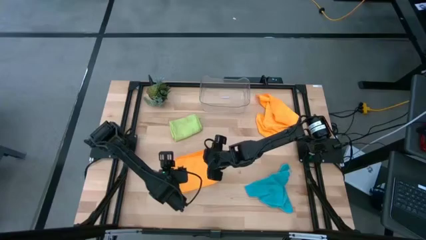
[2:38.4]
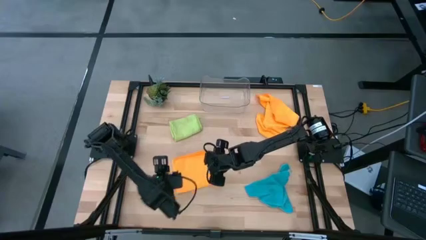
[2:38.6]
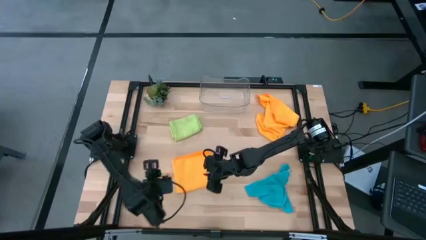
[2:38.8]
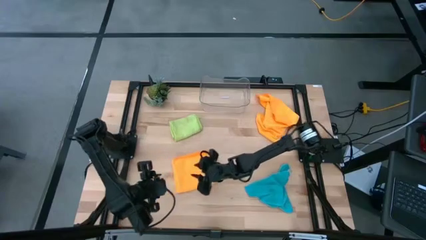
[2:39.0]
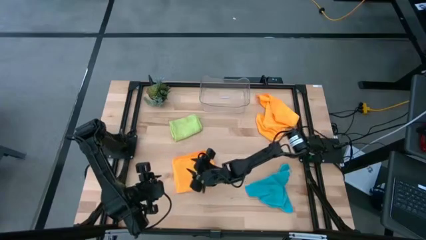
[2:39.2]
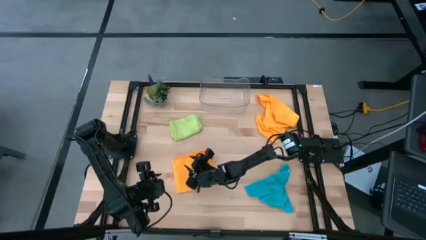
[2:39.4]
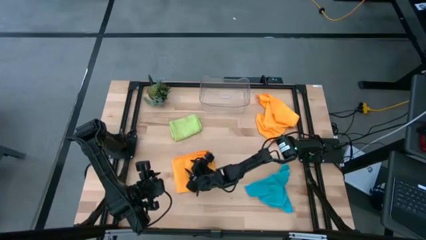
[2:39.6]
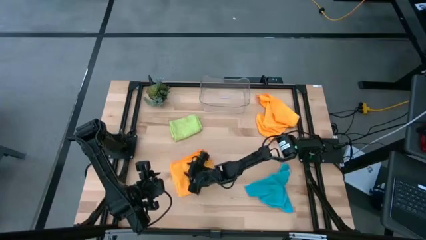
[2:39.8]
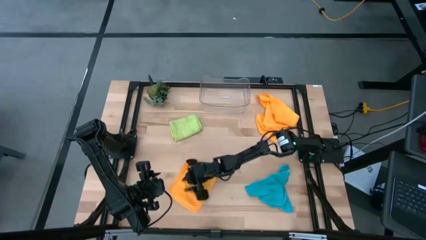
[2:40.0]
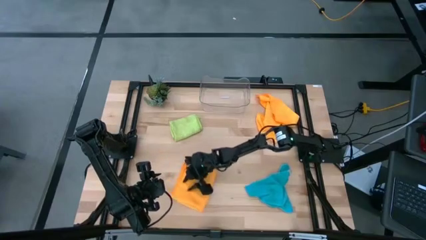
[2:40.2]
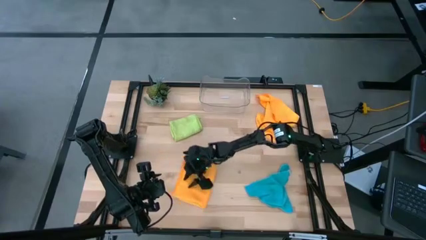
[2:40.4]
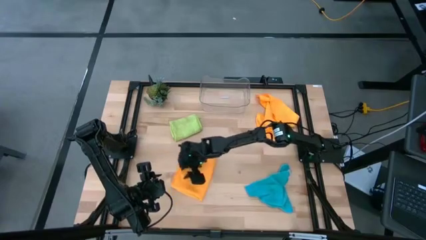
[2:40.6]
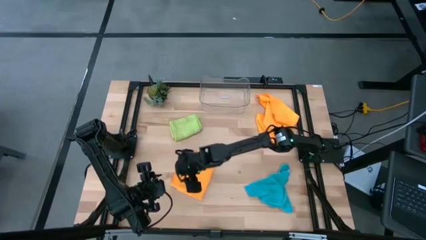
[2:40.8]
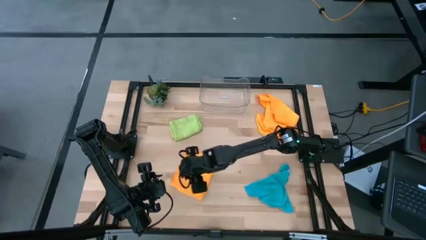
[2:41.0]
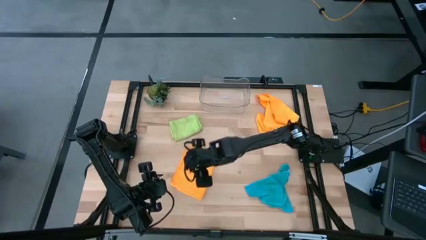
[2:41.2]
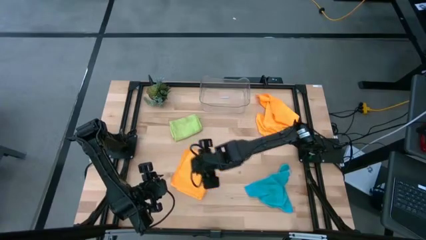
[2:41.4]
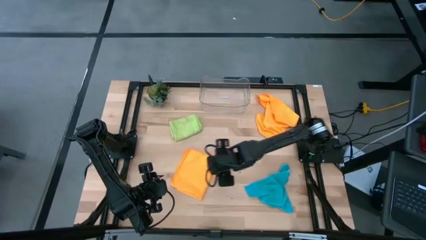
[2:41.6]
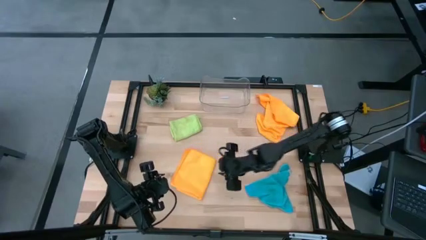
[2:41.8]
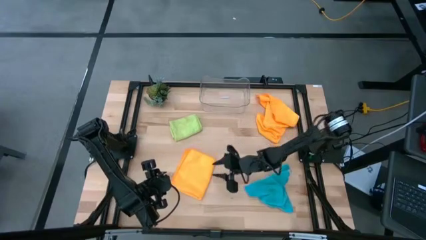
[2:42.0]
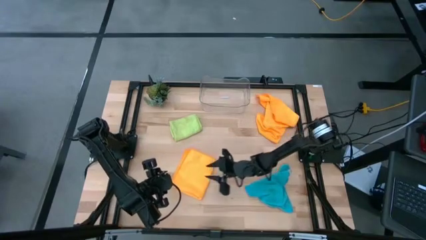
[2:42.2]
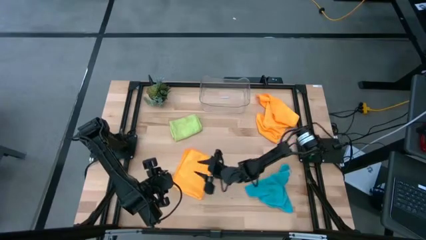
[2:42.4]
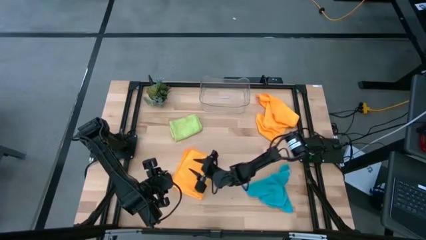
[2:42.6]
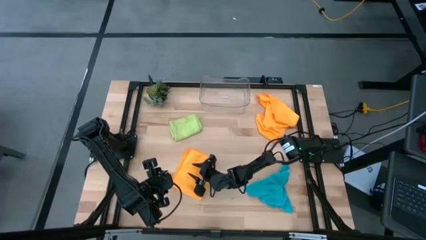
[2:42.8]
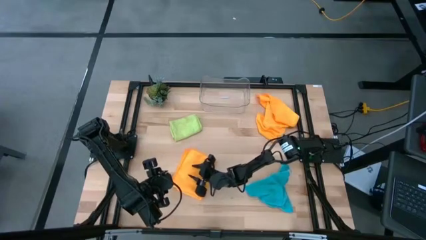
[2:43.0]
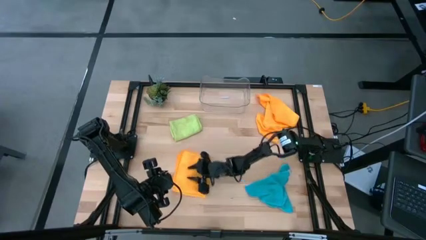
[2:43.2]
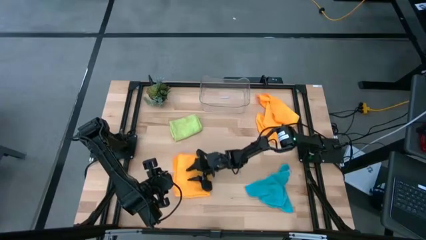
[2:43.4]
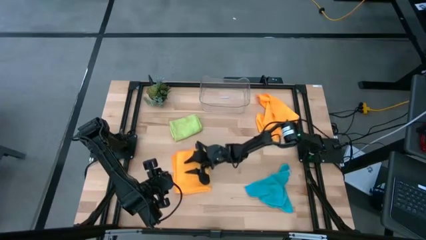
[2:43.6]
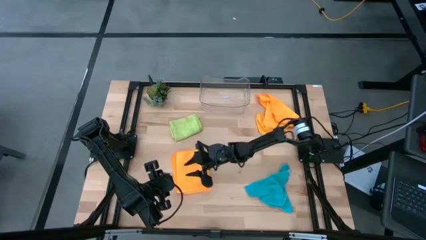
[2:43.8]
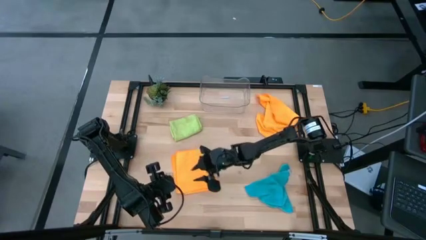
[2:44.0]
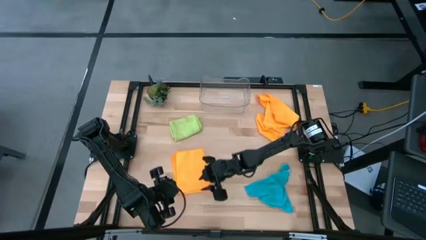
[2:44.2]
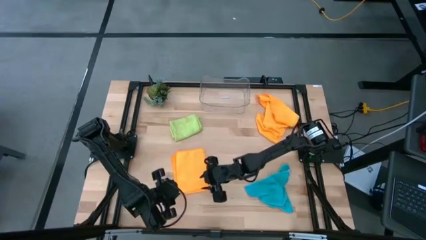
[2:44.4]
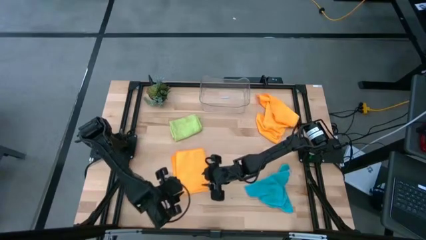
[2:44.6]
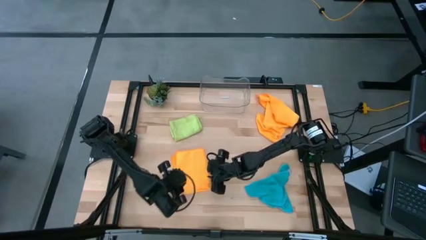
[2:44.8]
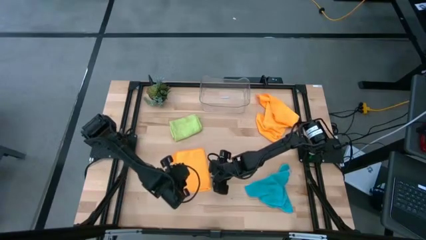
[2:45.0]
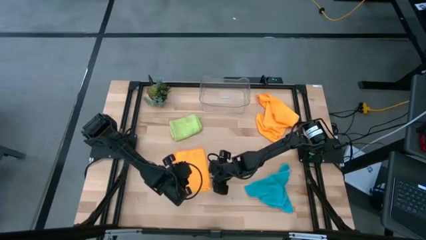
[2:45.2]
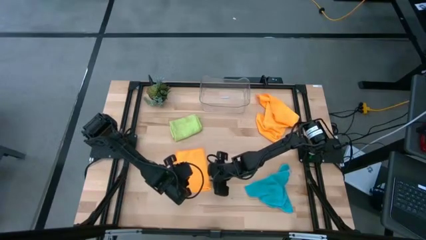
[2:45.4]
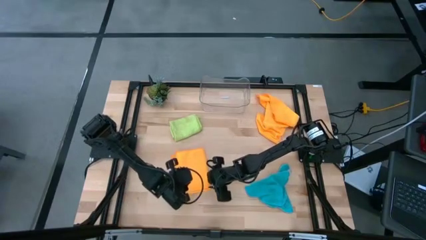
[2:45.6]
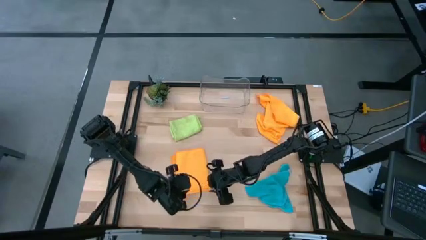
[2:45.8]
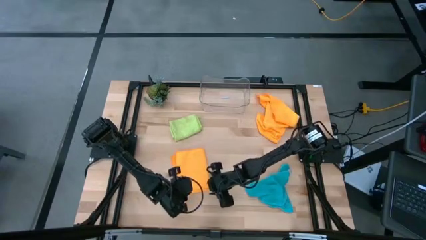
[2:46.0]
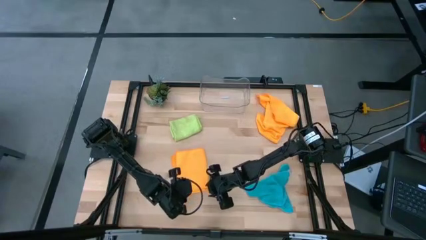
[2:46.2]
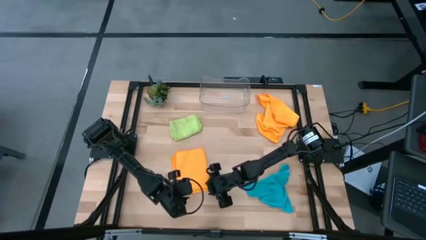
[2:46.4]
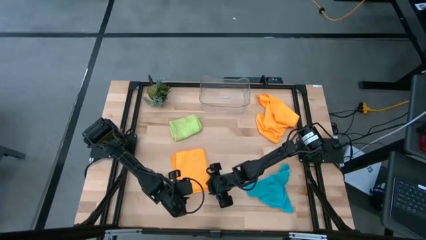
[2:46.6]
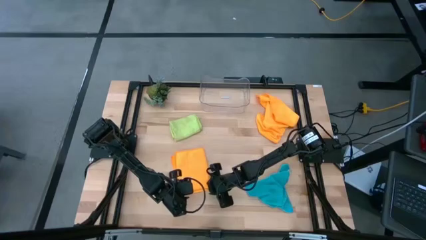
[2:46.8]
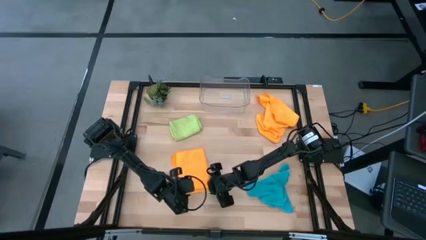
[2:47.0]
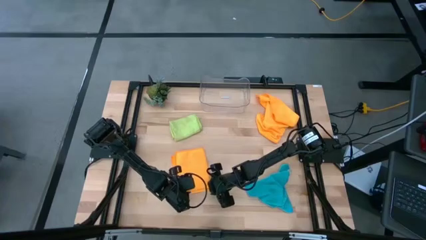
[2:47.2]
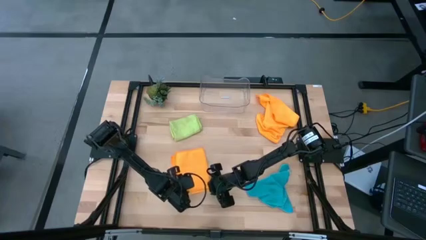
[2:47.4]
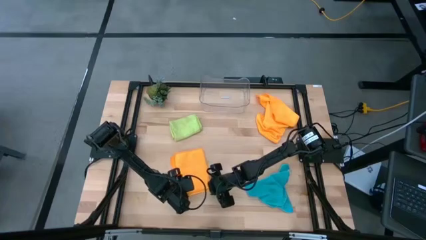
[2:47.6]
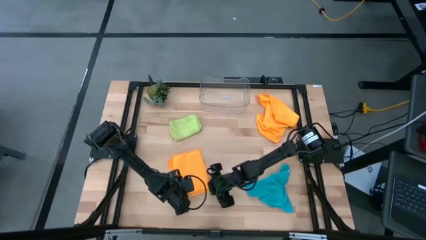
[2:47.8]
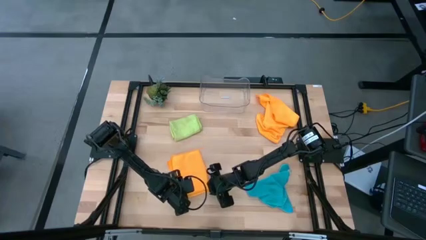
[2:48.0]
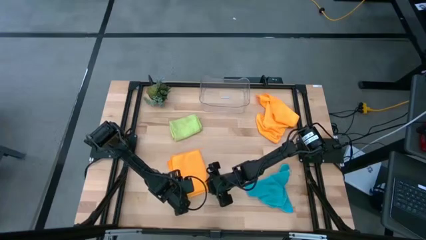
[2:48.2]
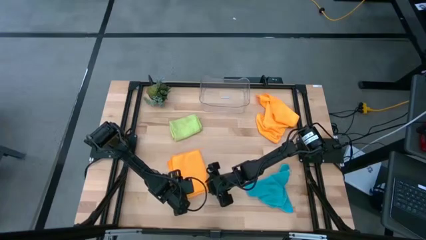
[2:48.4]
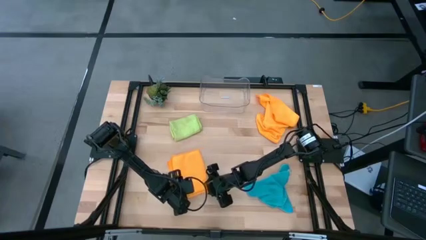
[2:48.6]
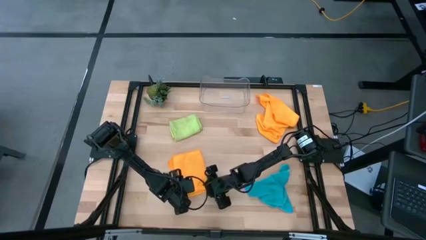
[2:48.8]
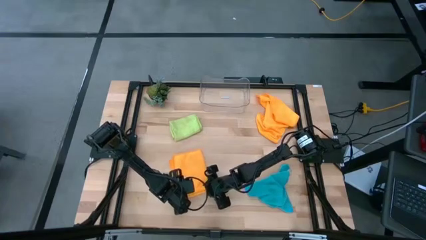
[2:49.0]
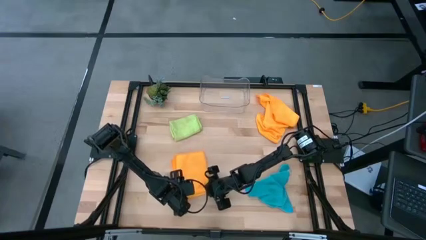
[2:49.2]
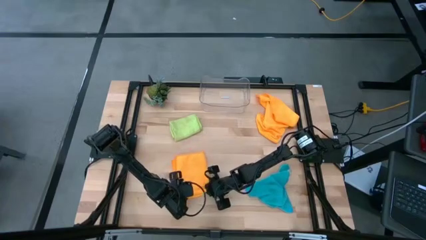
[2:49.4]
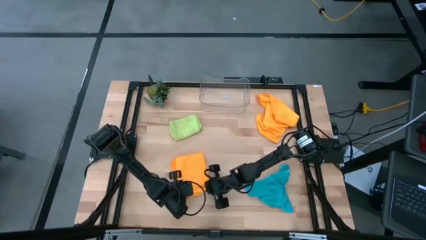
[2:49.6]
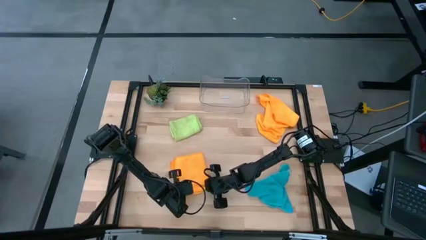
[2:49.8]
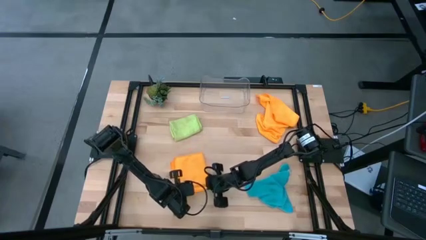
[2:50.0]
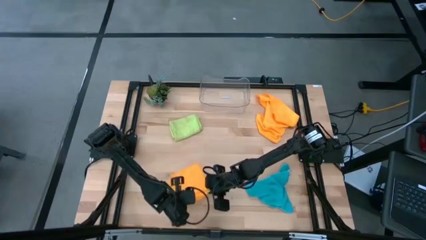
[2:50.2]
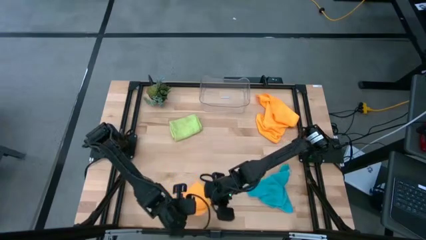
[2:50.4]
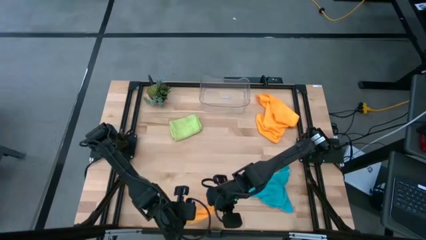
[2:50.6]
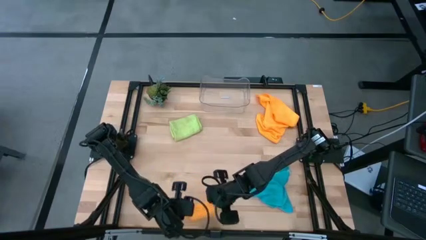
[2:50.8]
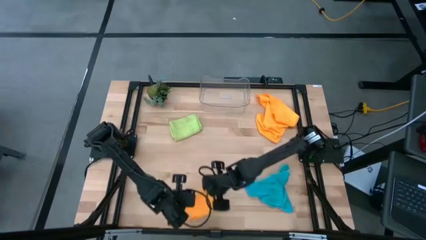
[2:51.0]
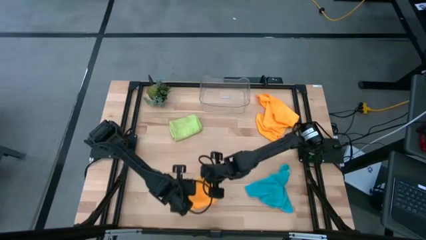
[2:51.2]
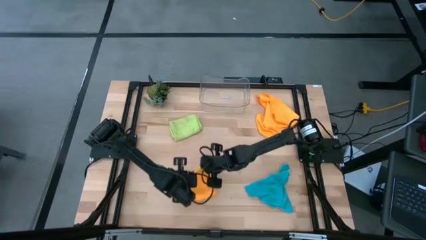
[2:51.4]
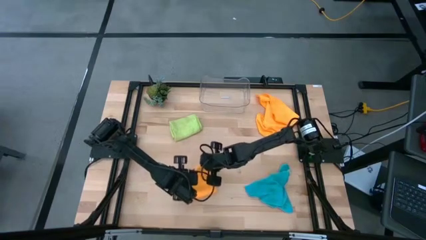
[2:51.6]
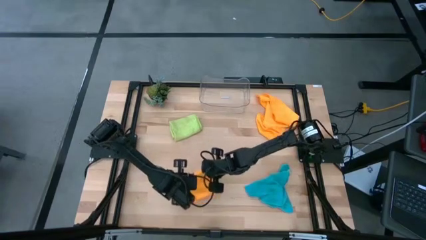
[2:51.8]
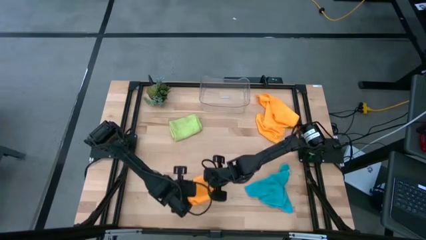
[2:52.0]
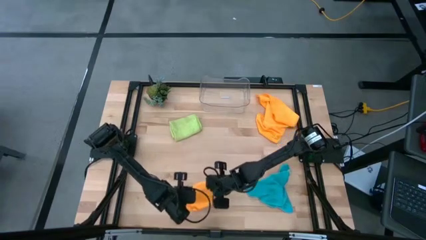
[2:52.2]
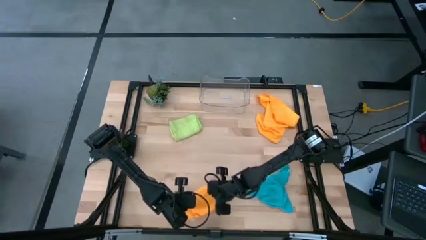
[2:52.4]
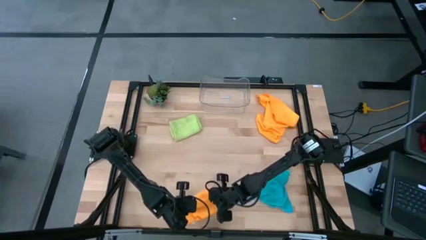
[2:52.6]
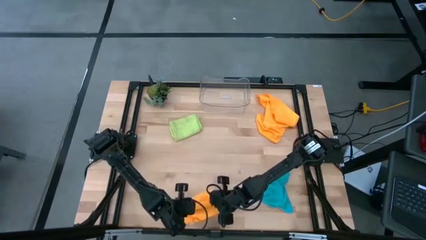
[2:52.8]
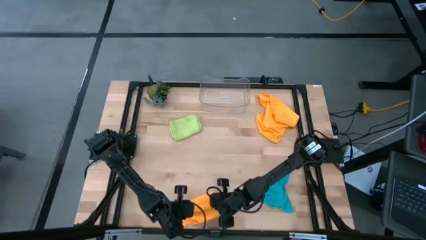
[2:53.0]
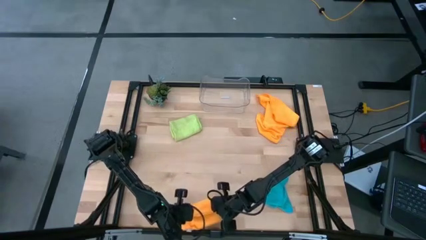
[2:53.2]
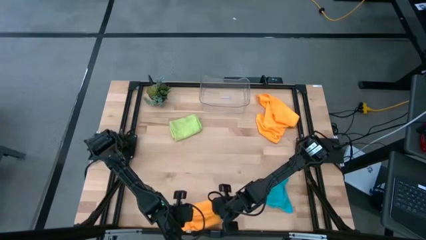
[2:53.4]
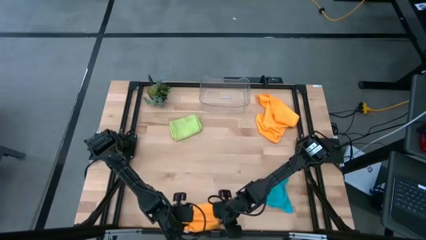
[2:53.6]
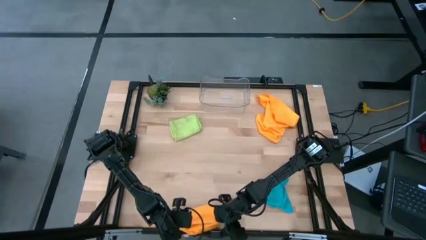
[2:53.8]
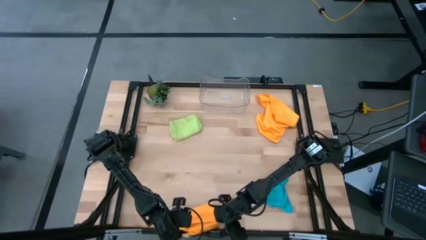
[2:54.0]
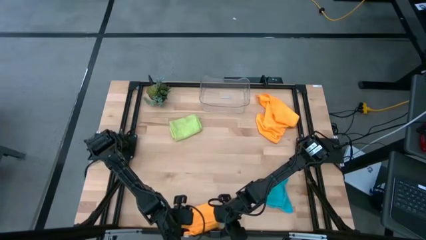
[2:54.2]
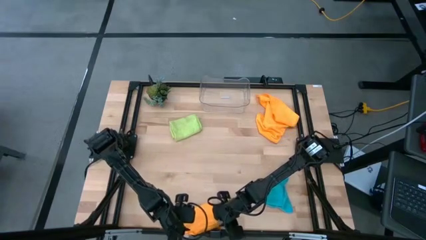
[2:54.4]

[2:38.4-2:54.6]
Task: Fold microfiber towels
Fold the bottom microfiber cloth

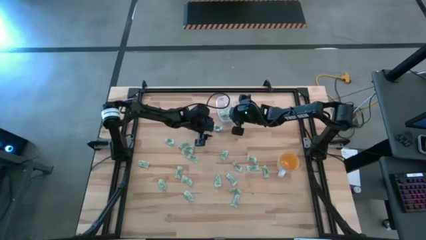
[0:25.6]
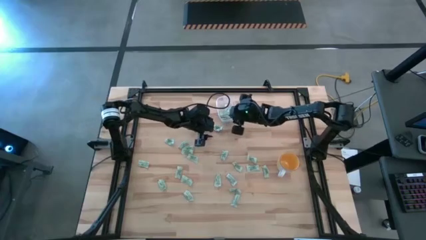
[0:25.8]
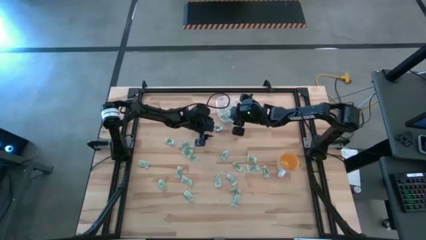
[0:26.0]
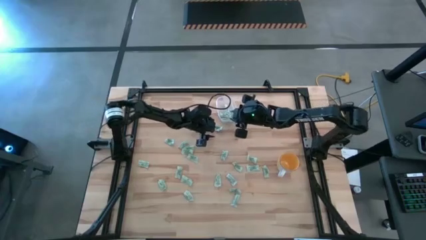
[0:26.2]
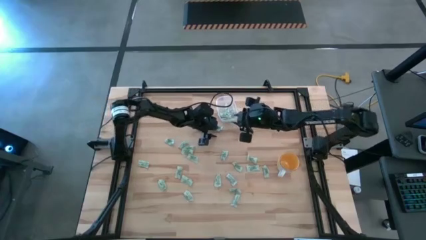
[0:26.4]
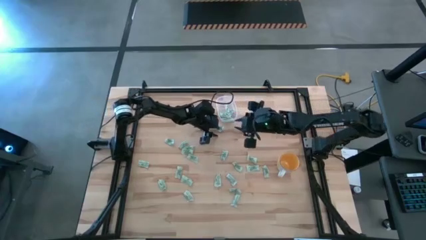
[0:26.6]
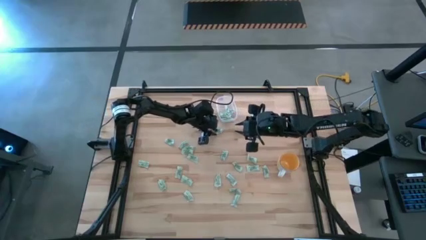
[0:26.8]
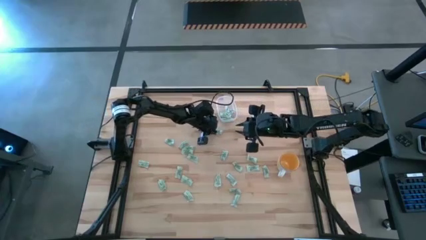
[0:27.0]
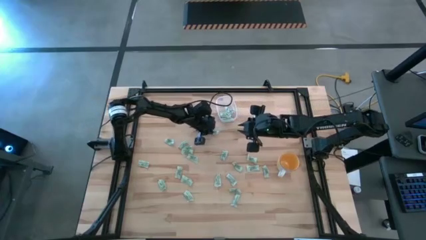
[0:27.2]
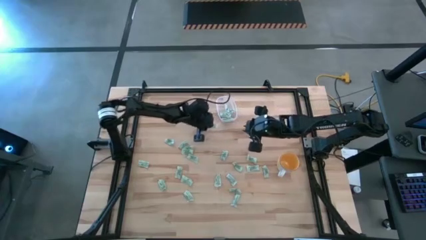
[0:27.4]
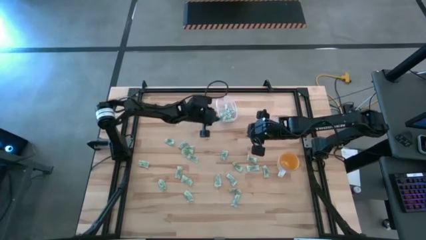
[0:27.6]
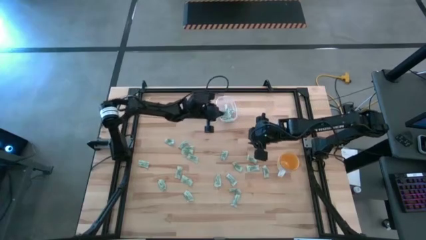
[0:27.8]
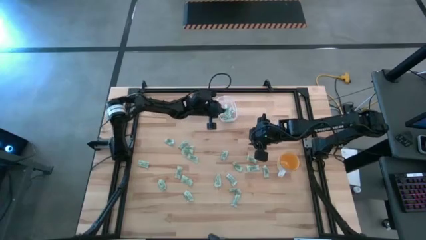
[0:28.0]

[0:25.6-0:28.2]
Task: Pick and place Stevia / Truvia into bins
Put the green stevia packet into the transparent bin
